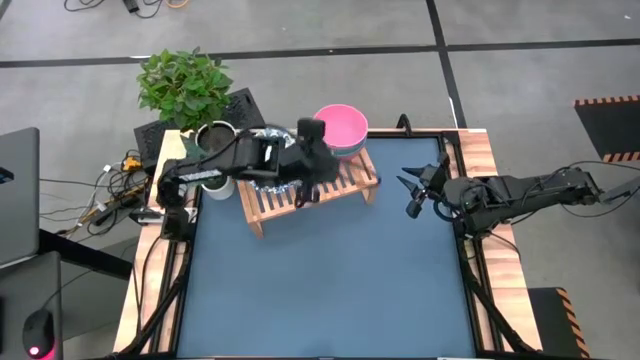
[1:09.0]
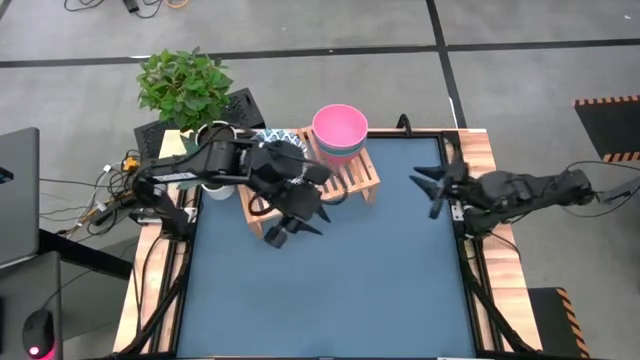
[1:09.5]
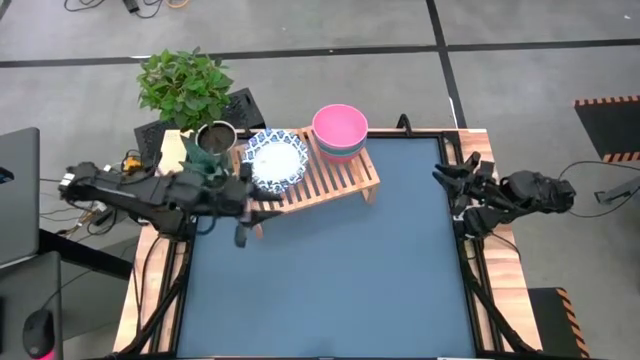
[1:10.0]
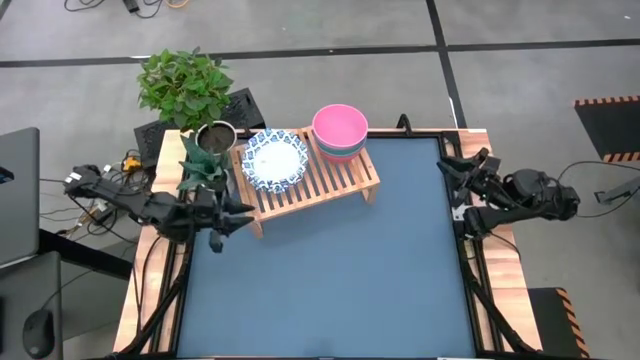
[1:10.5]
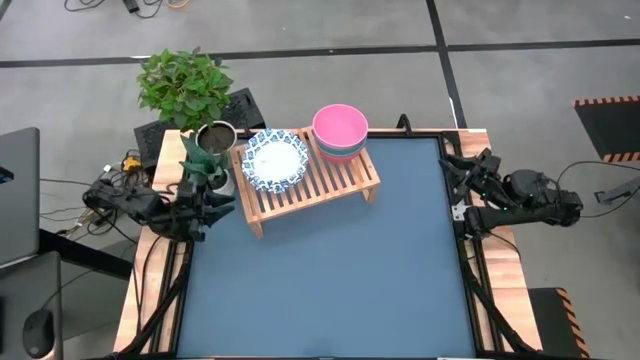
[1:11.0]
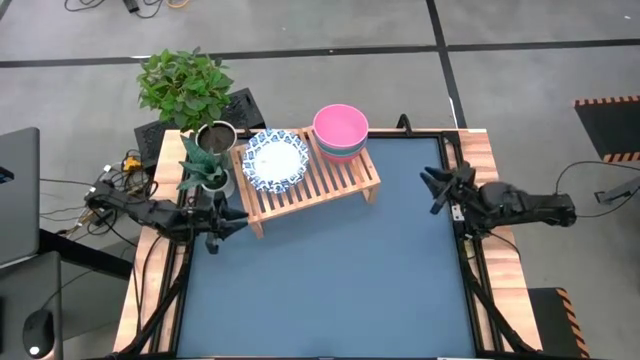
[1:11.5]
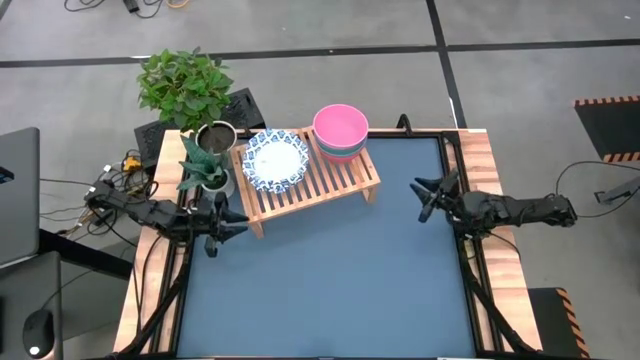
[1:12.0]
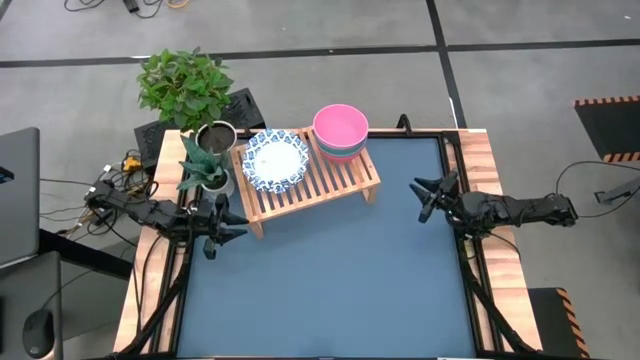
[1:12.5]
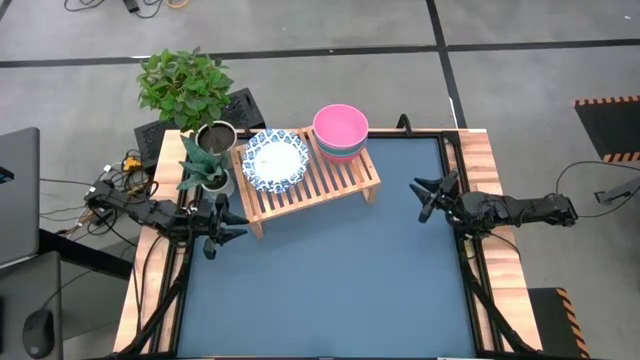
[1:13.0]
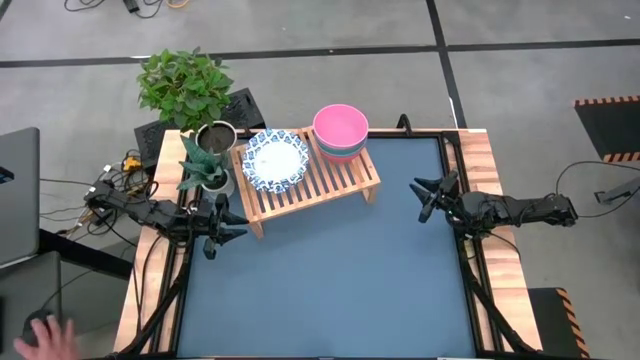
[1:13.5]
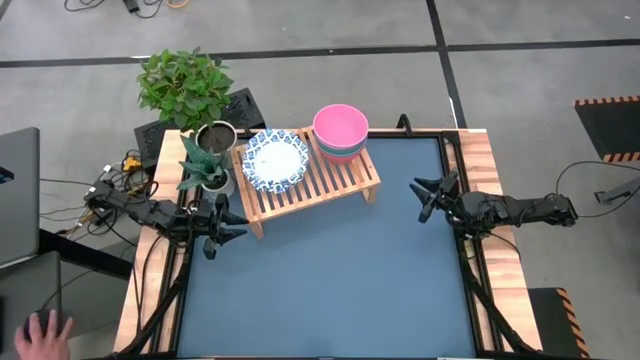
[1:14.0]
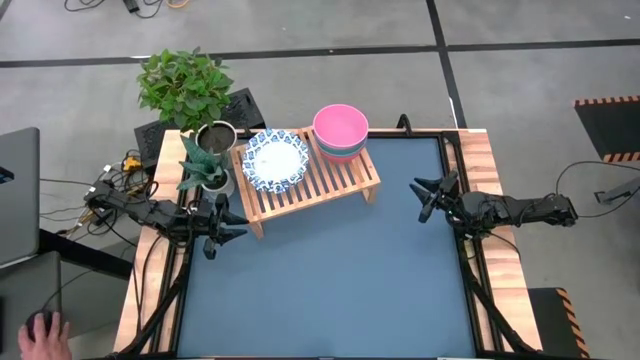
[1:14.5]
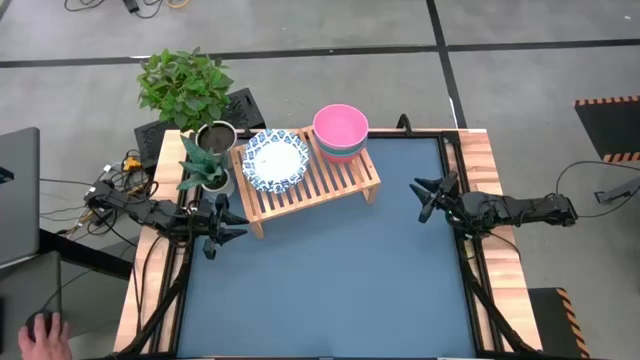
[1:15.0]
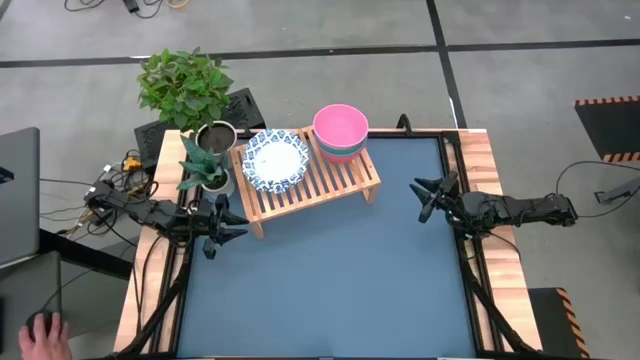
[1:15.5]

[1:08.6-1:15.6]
Task: Place and stack bowls onto a shelf
Return to Home Position

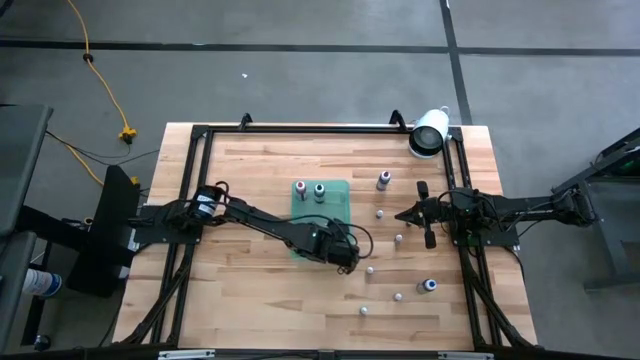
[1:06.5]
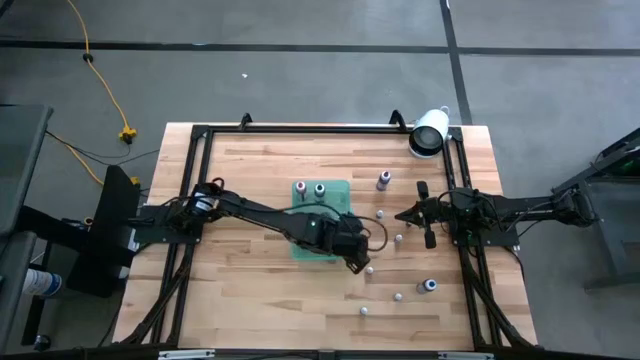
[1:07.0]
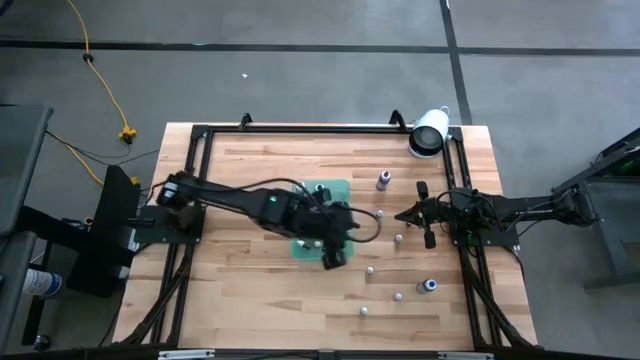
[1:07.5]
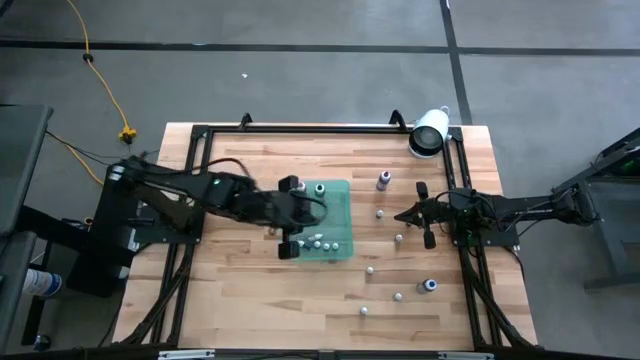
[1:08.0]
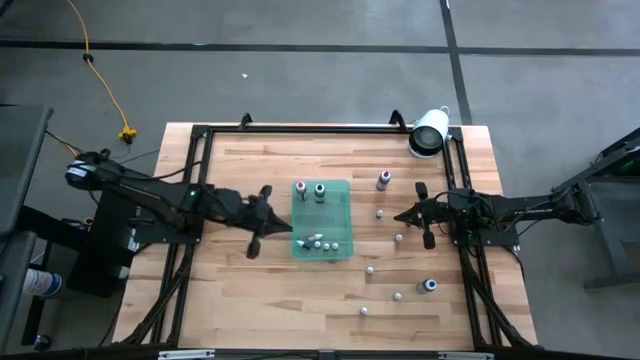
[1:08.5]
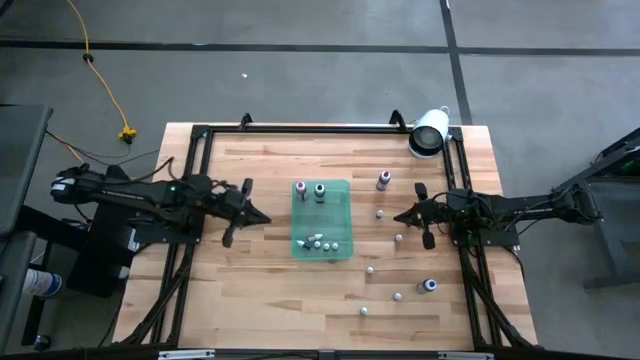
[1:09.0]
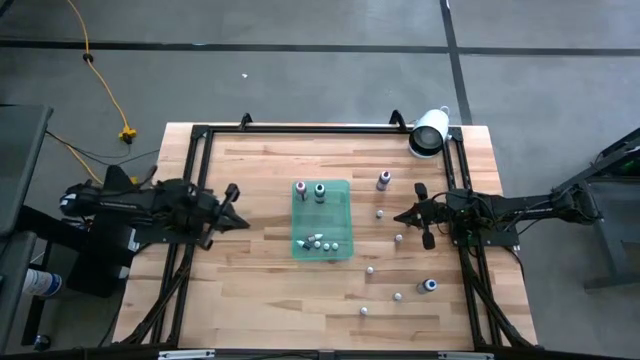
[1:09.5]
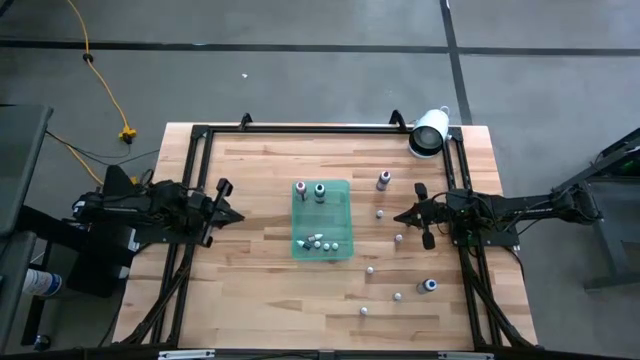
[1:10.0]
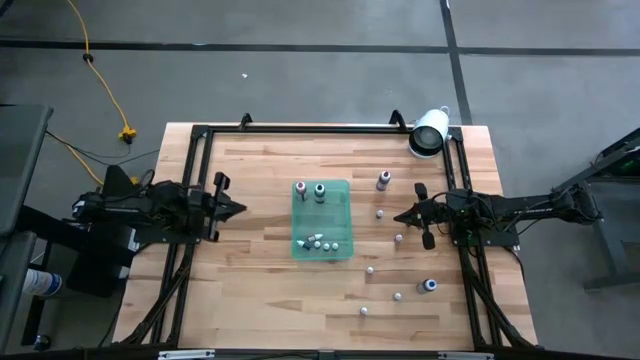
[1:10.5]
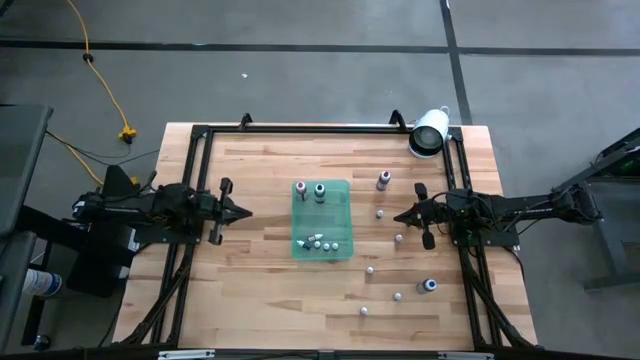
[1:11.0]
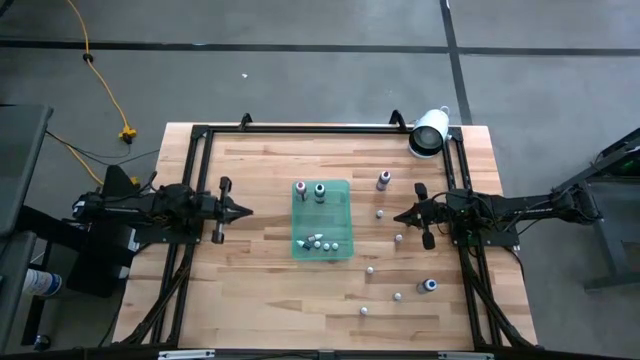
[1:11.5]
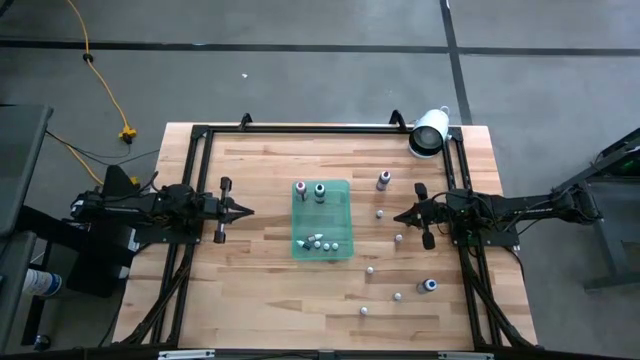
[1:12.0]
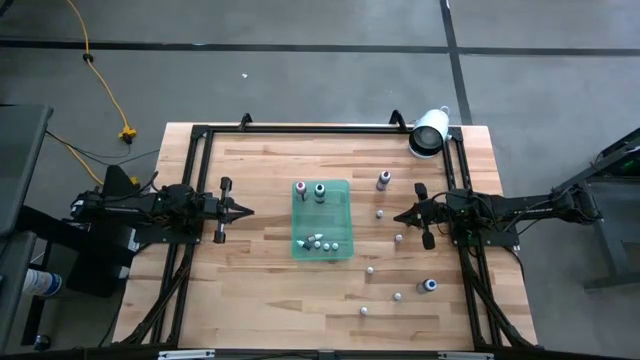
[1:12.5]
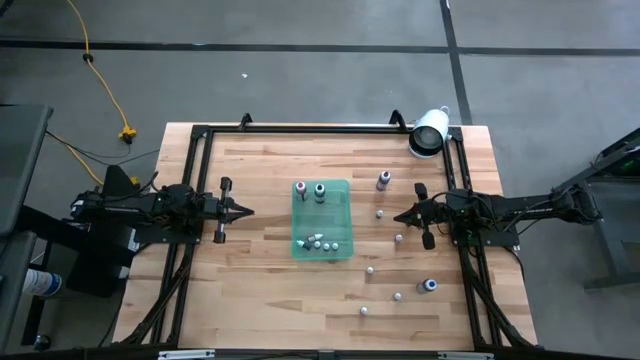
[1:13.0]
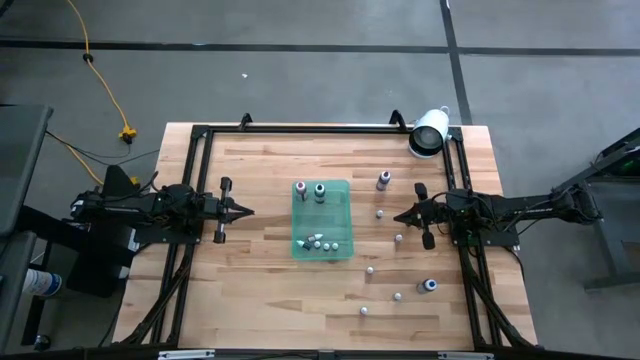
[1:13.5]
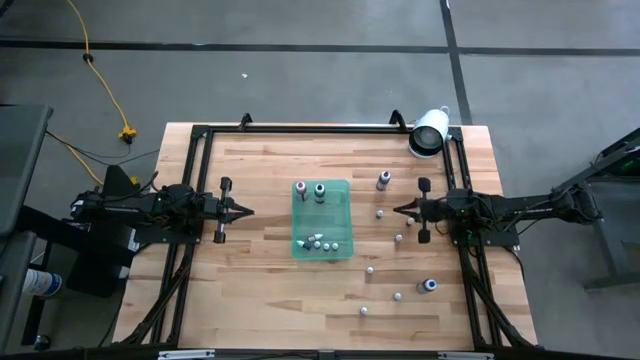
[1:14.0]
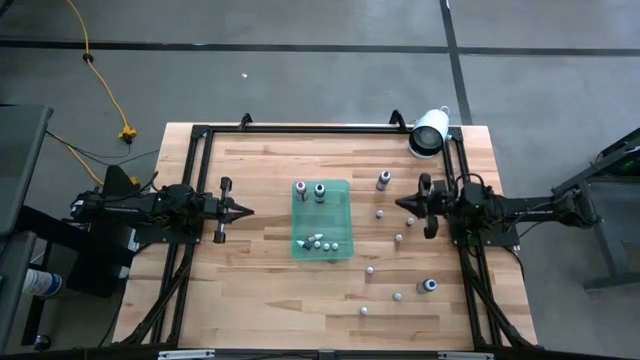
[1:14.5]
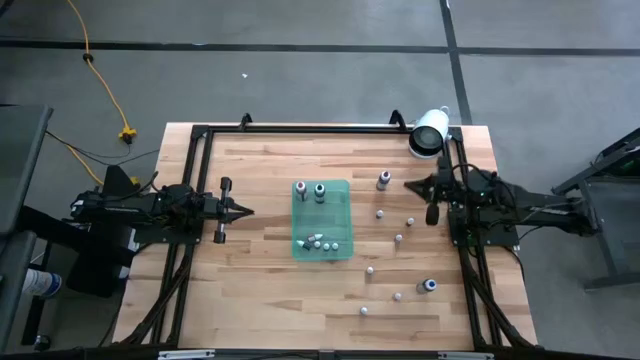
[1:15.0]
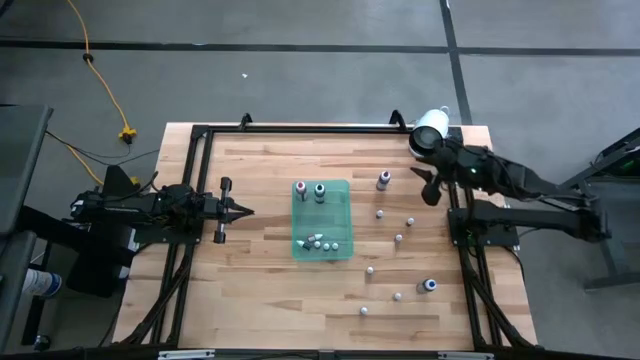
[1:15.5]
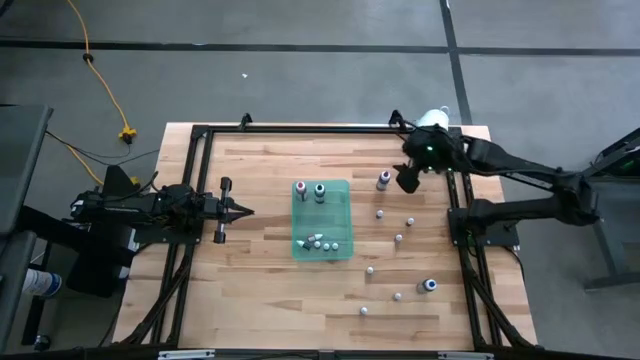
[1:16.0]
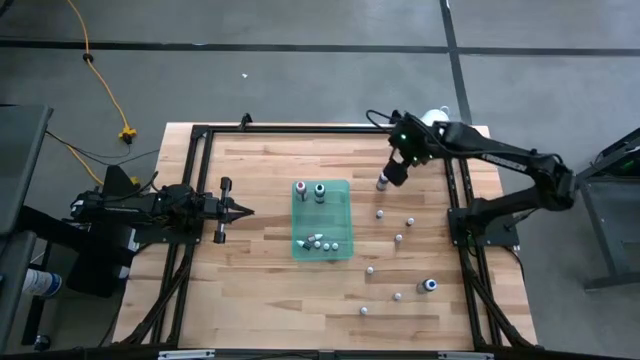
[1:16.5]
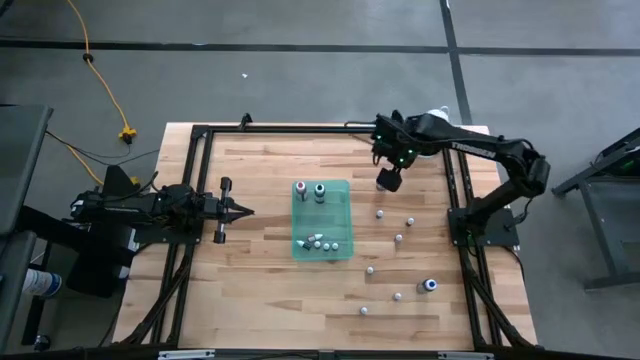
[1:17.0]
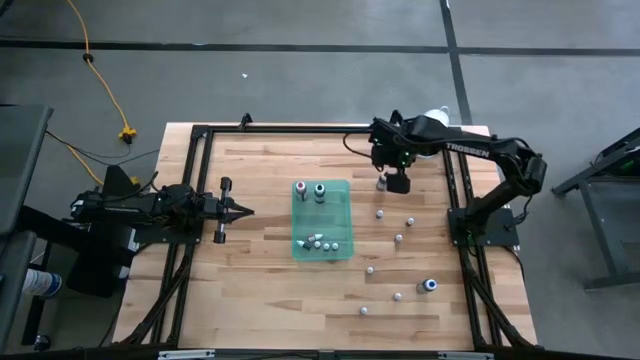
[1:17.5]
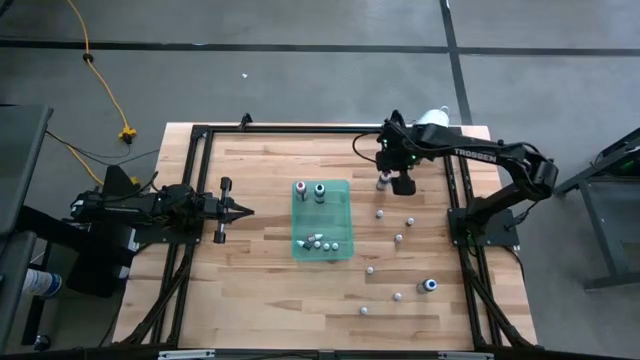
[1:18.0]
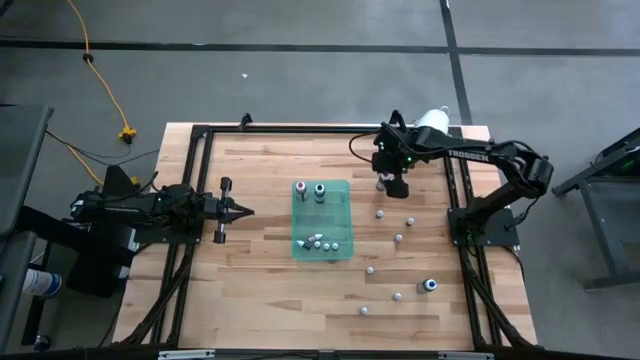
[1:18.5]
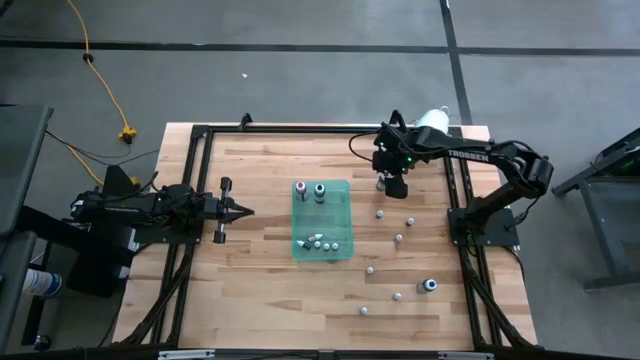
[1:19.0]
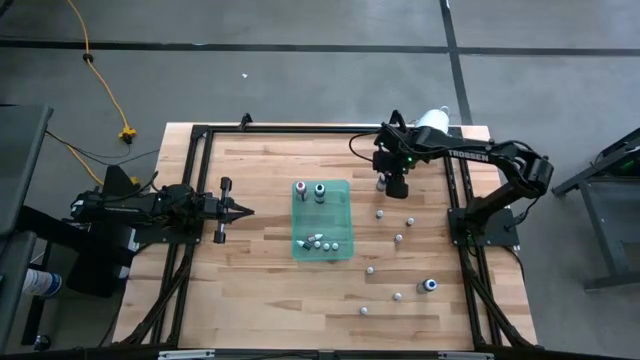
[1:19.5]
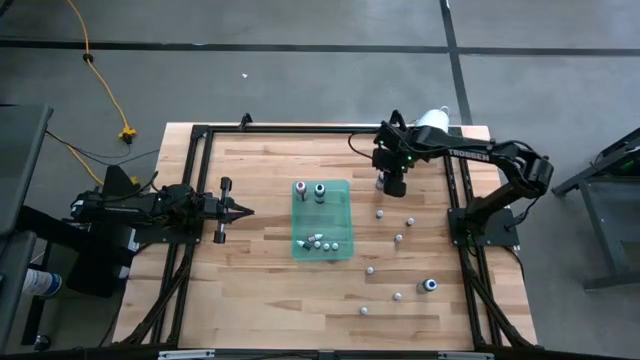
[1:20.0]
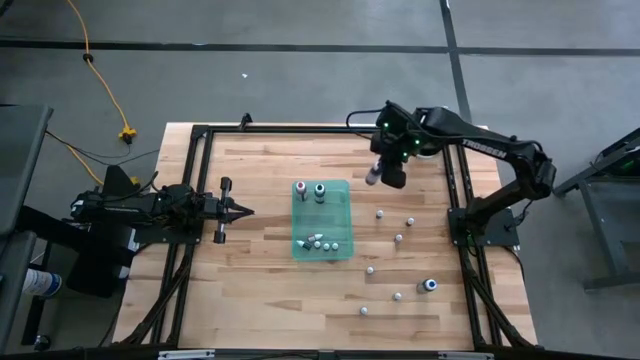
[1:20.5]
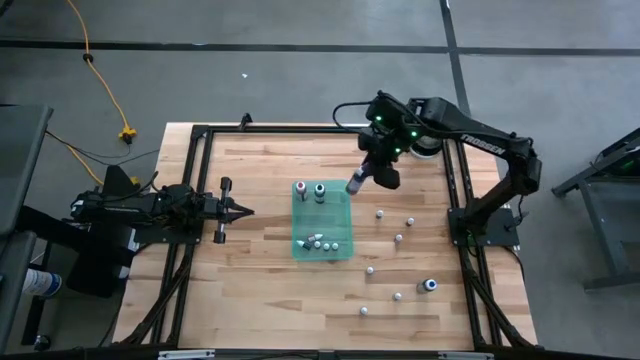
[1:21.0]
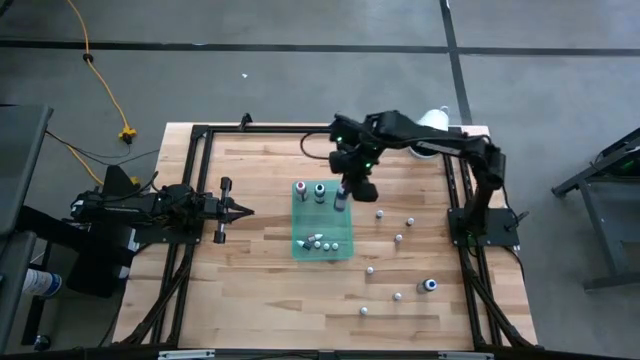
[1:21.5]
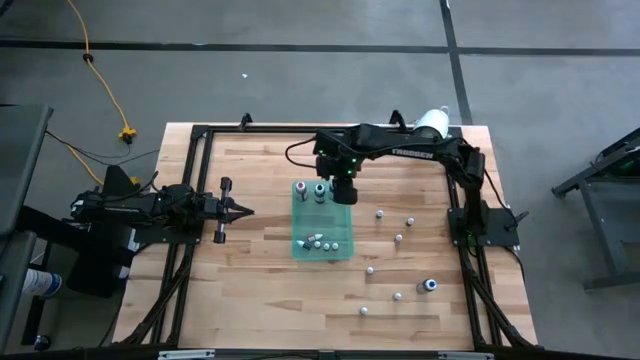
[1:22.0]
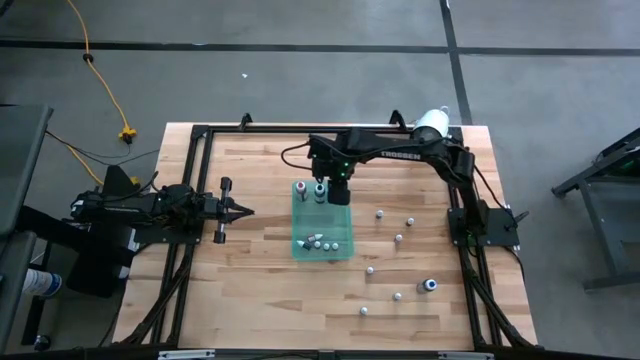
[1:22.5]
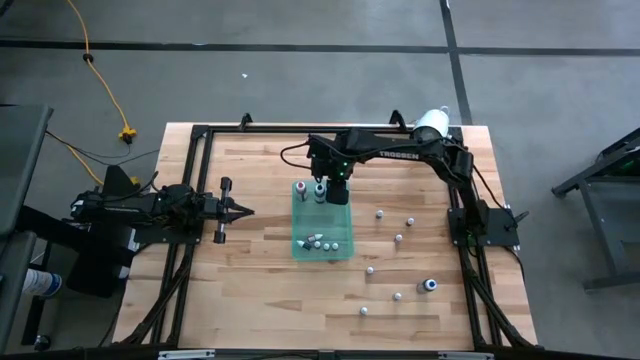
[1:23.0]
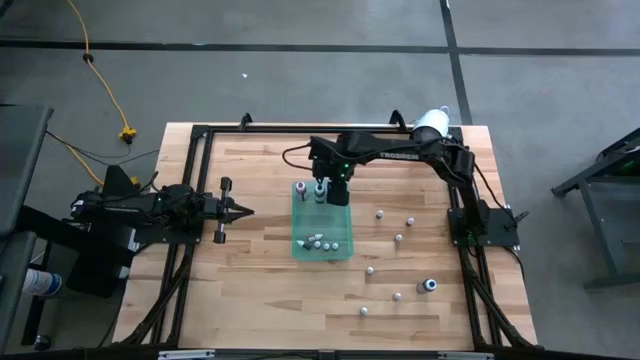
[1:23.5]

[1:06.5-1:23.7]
Task: Pick & Place food coloring
Put the big violet food coloring bottle into the green bin
